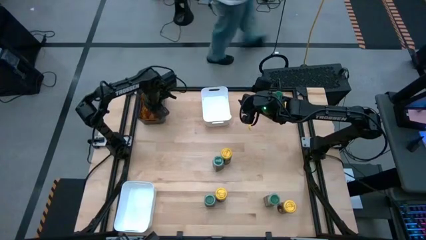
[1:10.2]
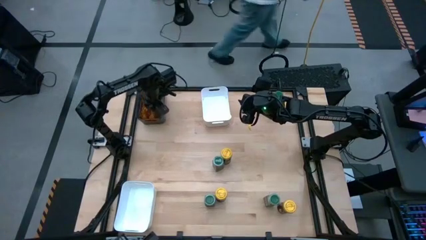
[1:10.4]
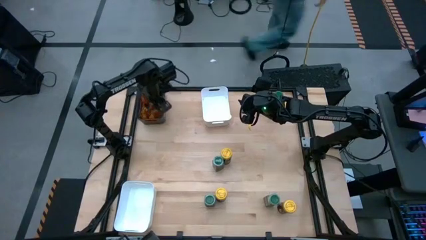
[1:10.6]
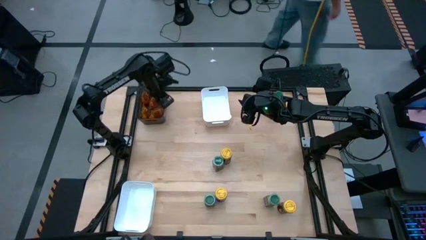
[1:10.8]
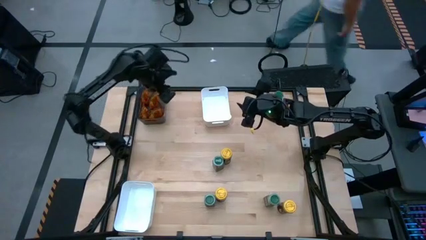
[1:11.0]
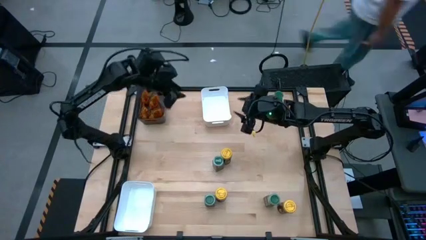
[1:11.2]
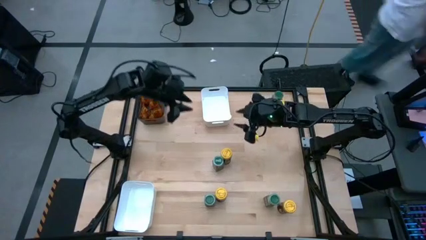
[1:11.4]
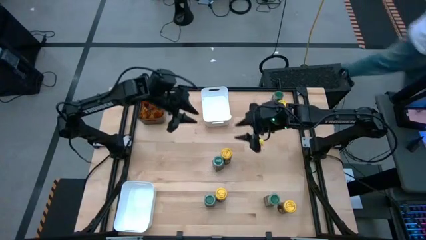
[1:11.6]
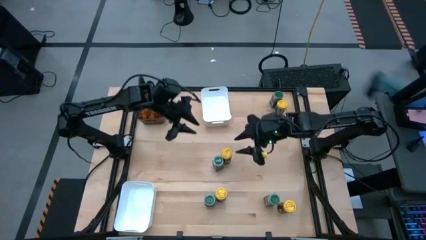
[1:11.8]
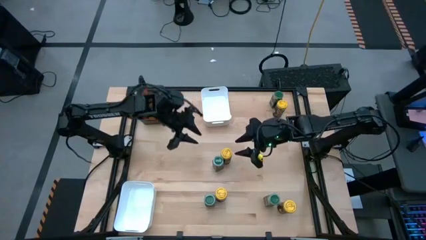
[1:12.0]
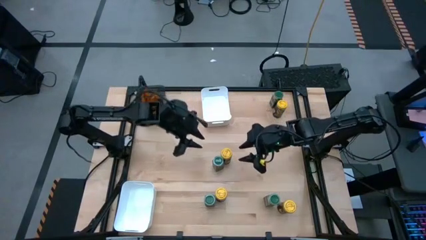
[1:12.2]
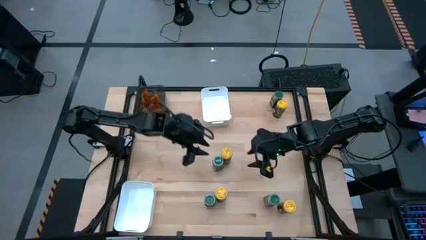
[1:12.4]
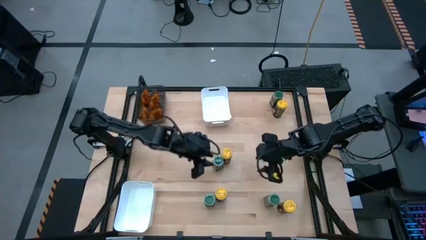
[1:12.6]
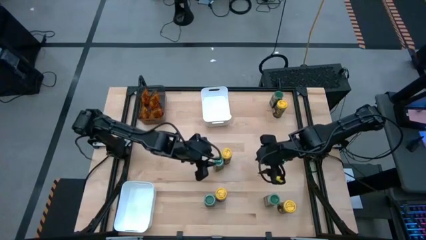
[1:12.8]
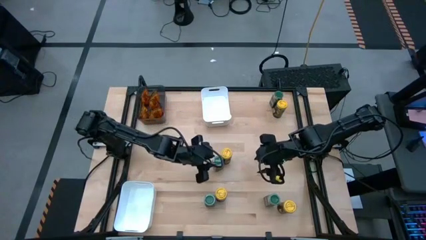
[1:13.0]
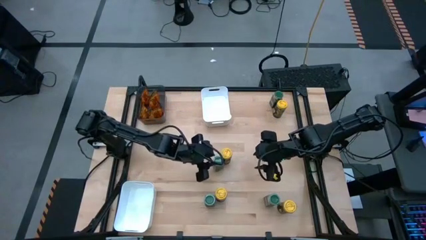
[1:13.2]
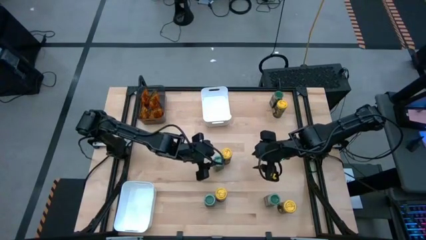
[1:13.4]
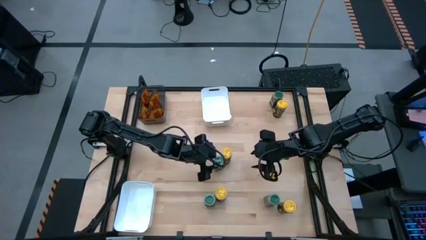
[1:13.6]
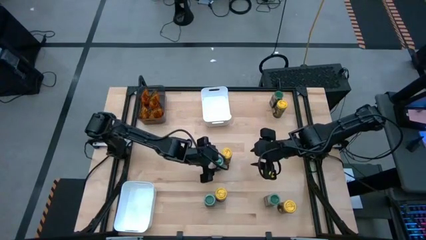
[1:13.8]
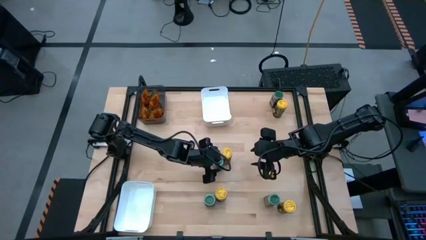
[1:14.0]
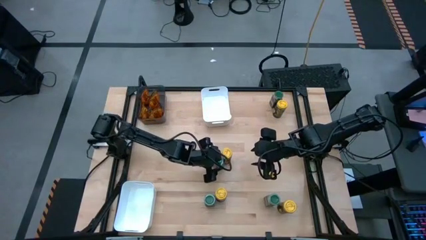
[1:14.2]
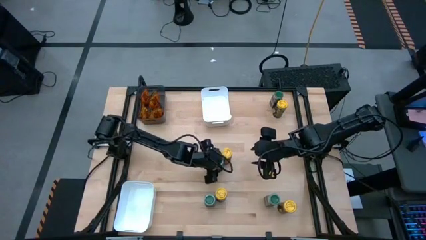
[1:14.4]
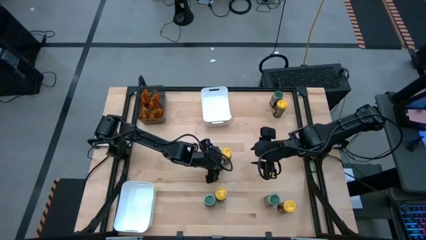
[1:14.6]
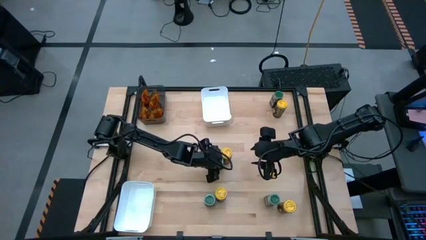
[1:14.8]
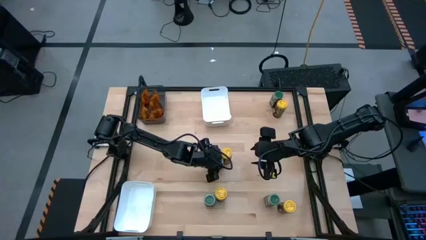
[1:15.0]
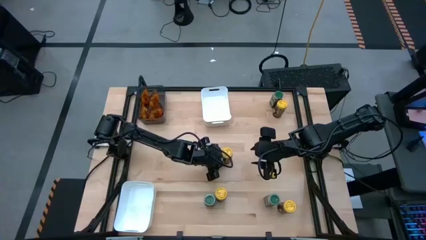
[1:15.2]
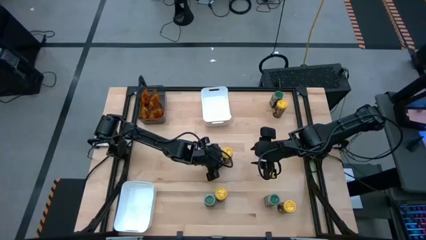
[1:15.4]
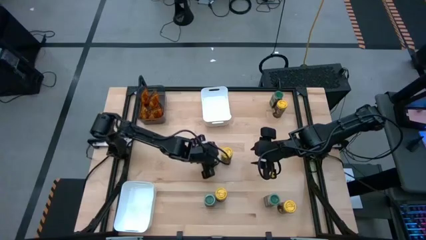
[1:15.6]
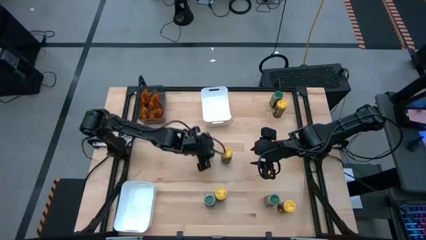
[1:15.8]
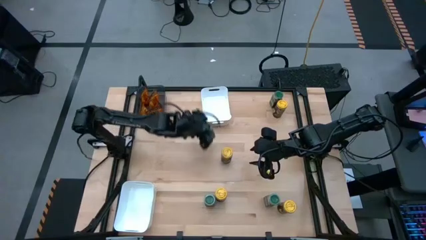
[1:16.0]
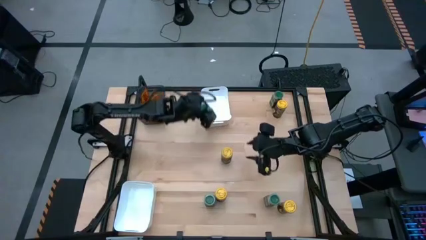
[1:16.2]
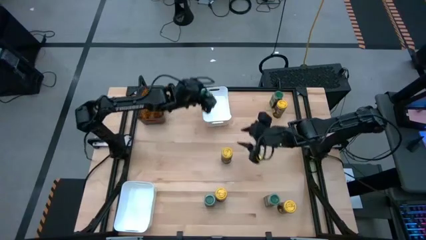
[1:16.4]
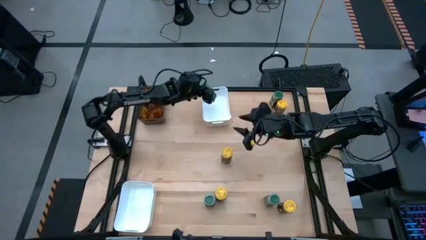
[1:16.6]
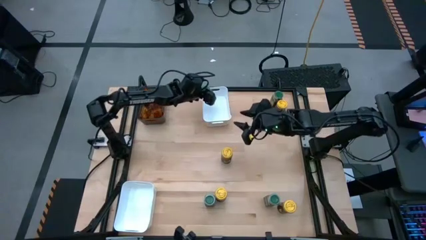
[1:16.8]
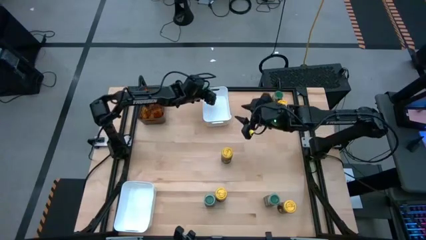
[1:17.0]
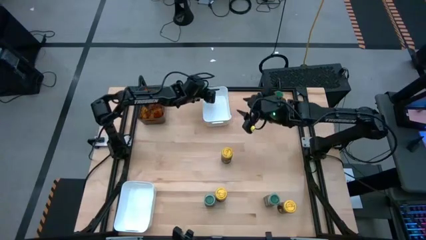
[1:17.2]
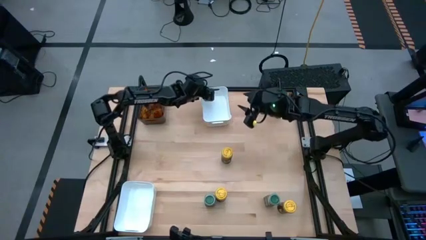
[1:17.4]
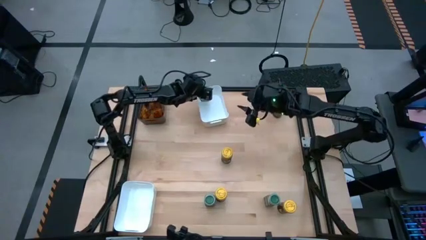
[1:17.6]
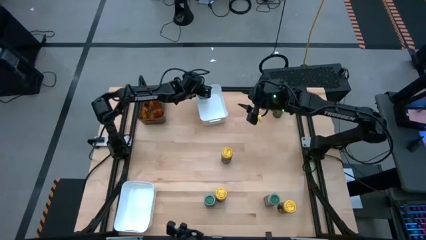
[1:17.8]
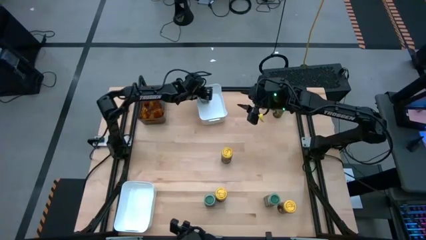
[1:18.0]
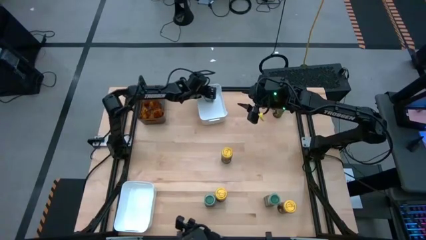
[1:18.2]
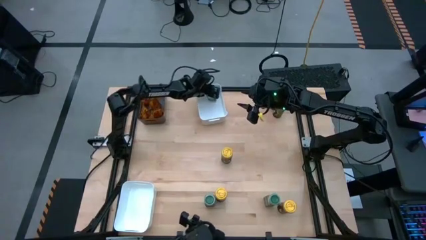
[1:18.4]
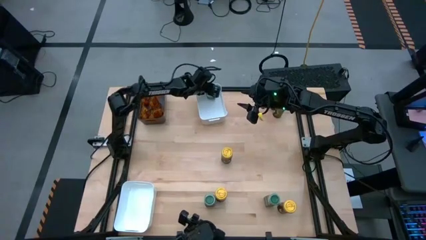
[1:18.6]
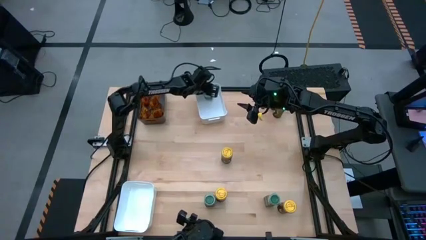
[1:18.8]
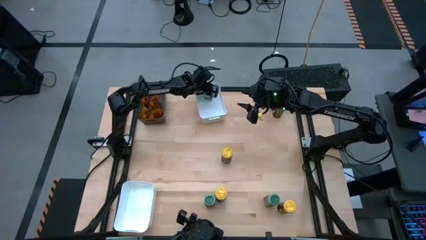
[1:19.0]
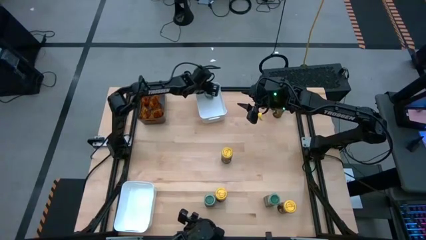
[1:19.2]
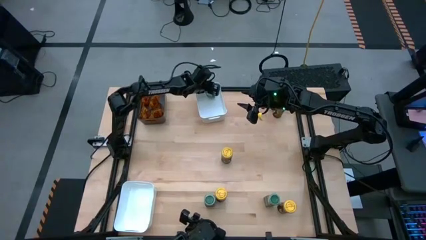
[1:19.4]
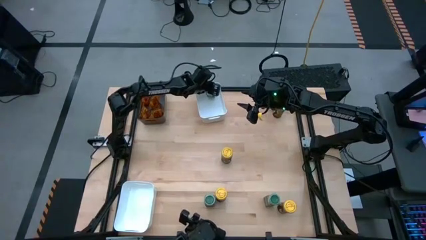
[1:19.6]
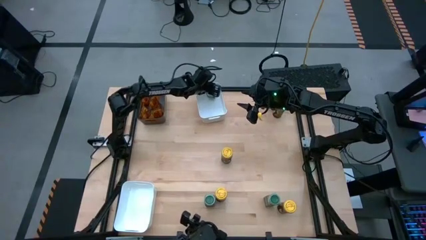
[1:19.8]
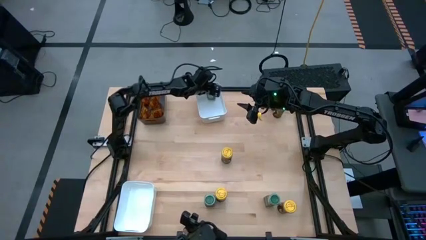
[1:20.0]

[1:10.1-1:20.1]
Task: Sort spices by type
Put the middle green seasoning bottle into the top white bin

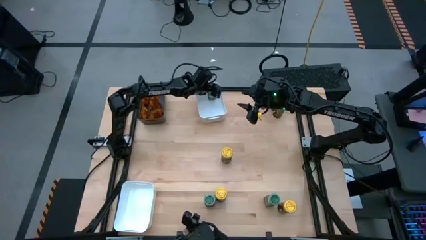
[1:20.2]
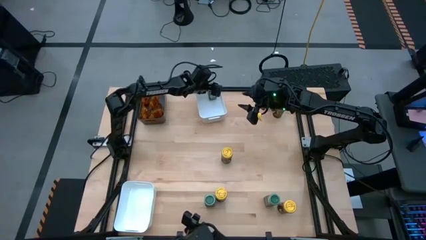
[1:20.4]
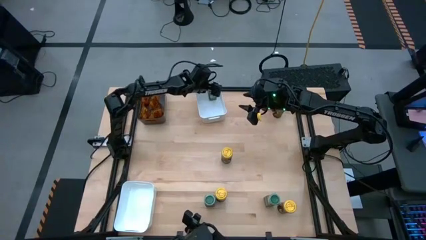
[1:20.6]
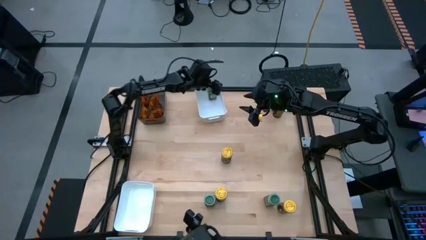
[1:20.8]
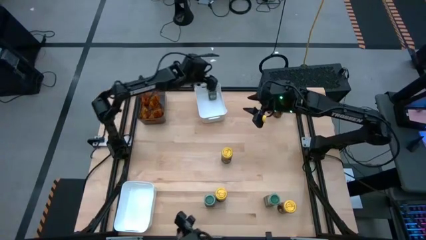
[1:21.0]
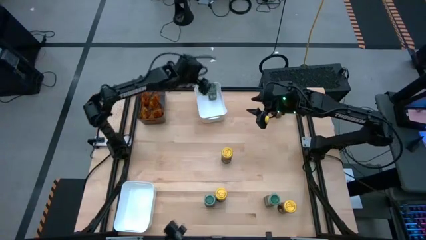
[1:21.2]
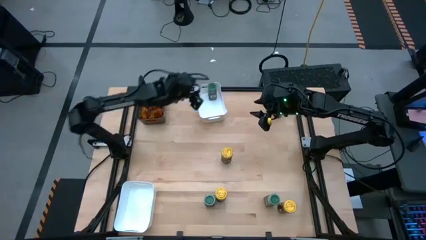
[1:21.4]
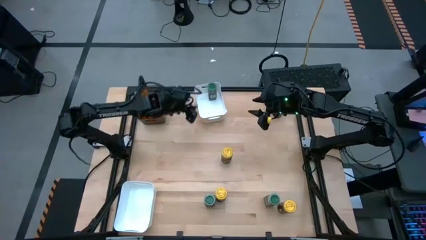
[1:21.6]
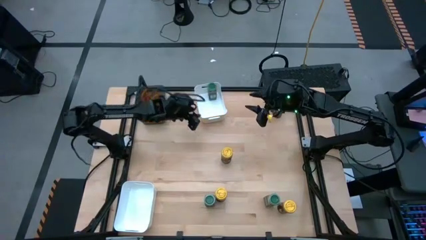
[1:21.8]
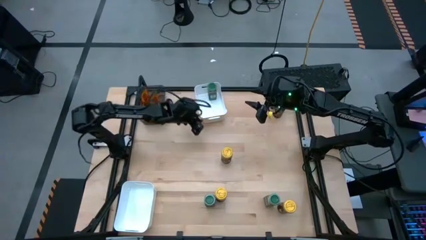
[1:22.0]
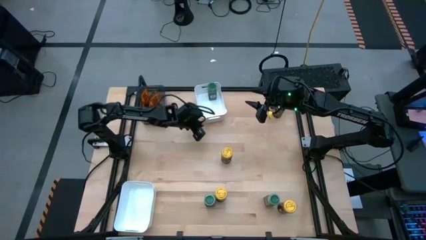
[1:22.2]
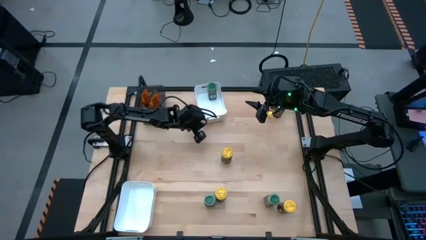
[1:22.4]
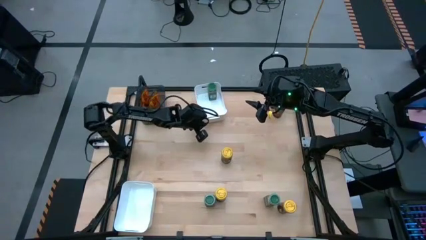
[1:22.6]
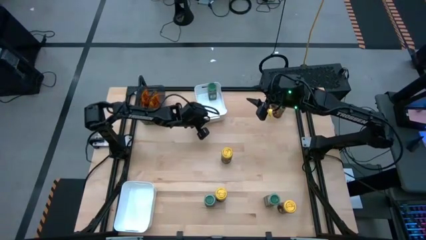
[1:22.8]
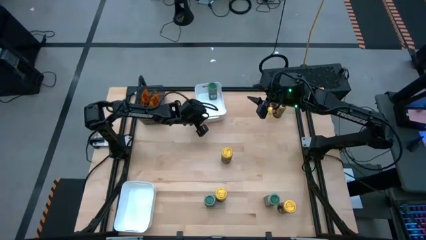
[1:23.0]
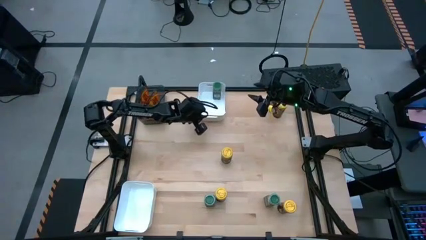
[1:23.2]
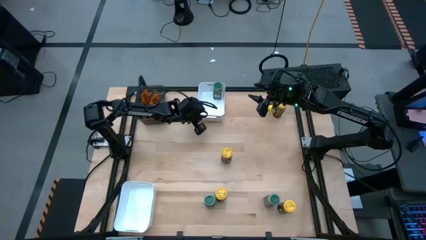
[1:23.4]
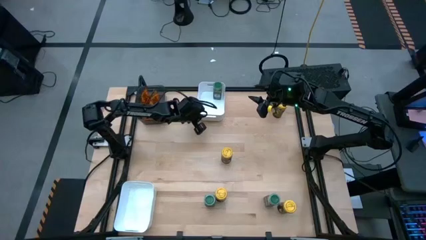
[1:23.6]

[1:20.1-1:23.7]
Adjust the top white bin

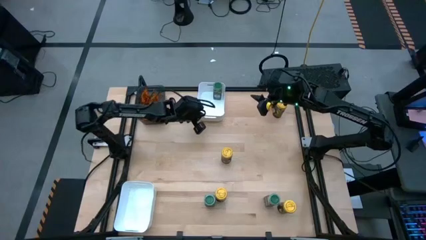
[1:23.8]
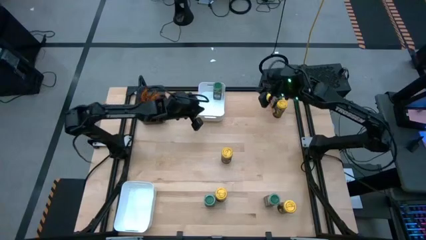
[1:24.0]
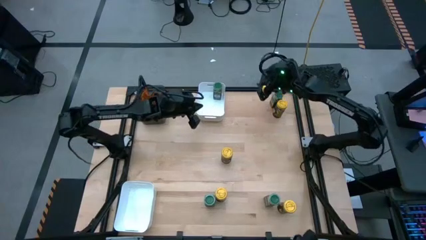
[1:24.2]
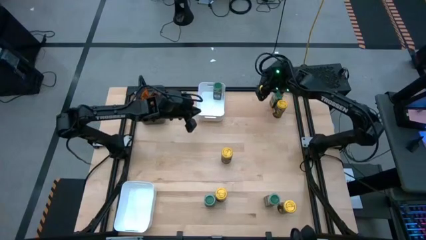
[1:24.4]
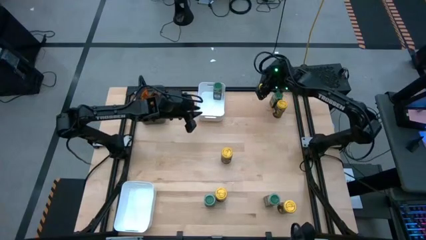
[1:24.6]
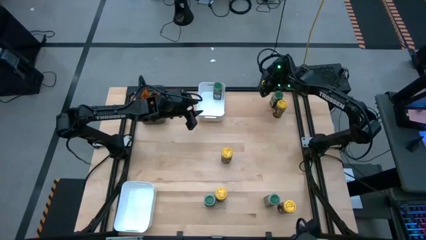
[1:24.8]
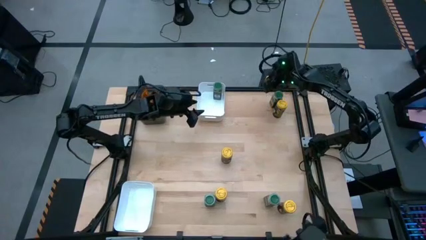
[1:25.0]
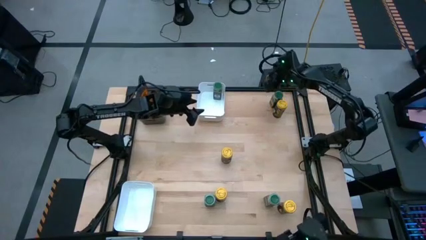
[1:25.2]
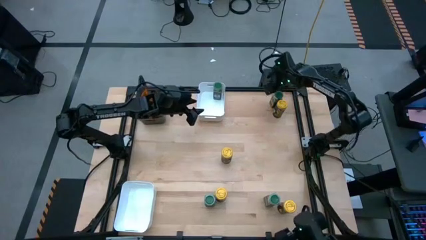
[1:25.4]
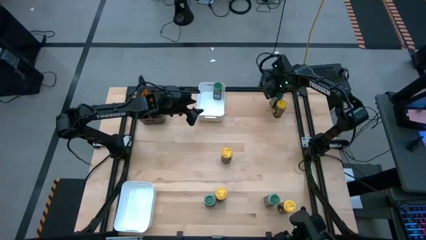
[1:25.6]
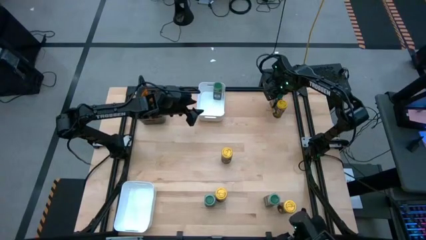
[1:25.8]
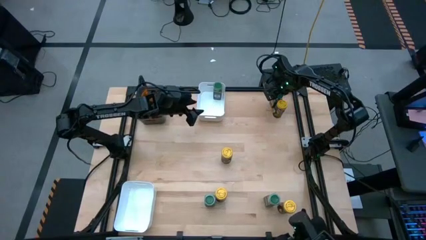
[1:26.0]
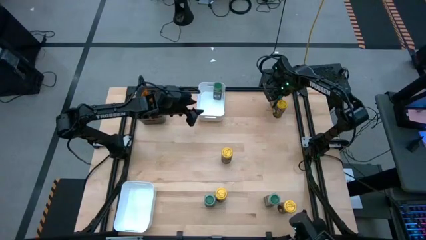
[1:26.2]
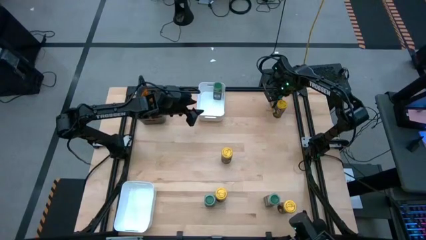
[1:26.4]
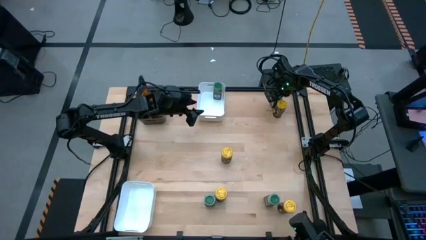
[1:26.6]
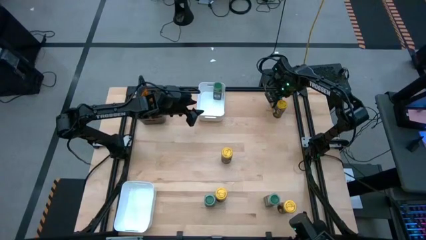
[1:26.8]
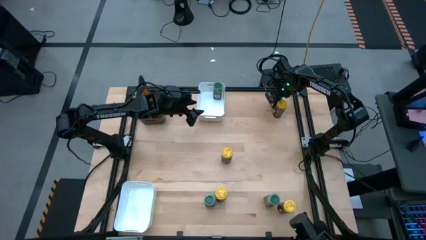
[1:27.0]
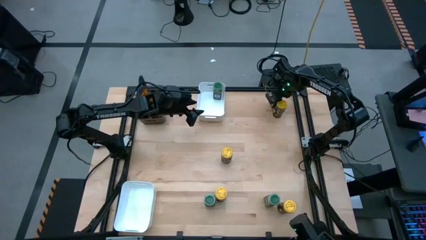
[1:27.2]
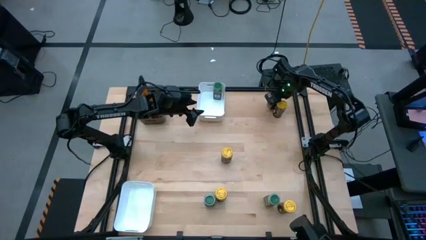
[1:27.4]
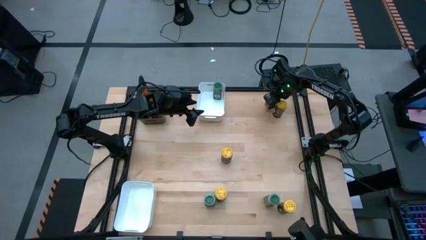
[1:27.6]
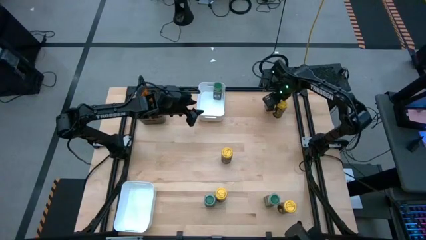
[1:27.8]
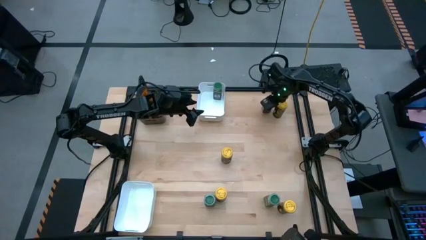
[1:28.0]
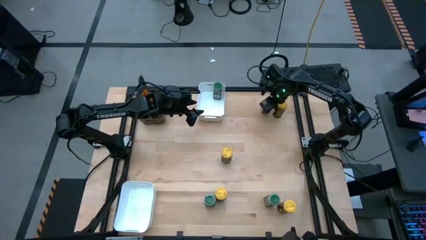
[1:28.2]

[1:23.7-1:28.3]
Put the top green seasoning bottle into the top white bin
